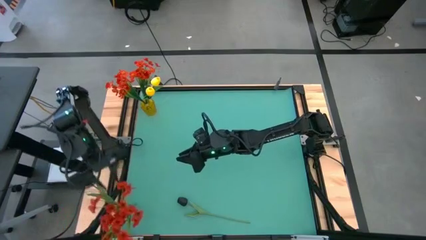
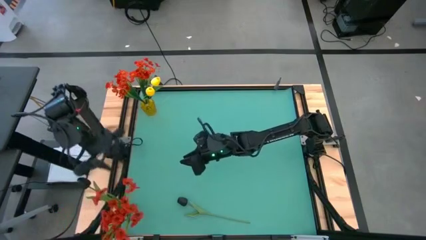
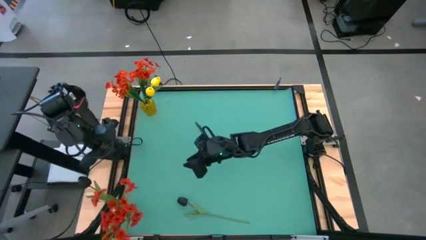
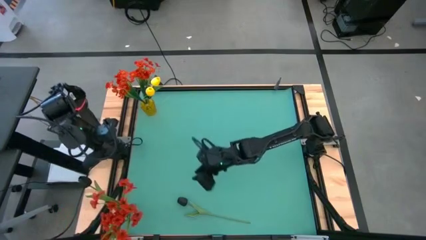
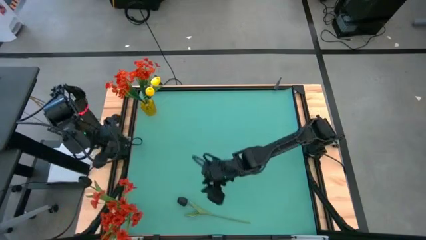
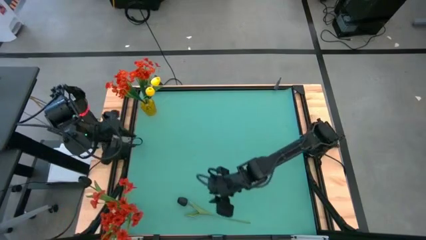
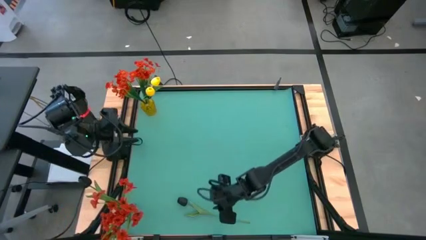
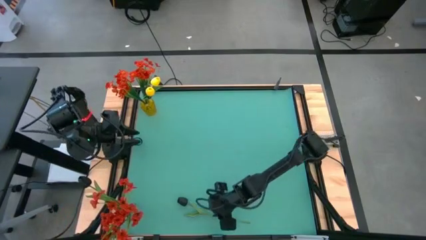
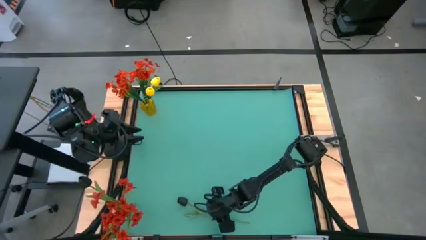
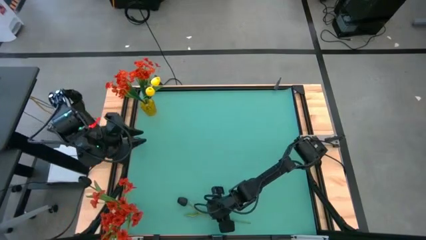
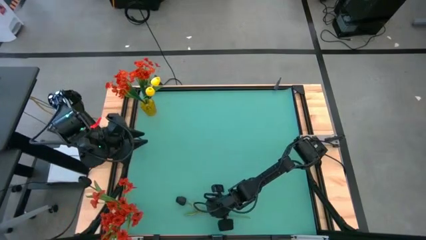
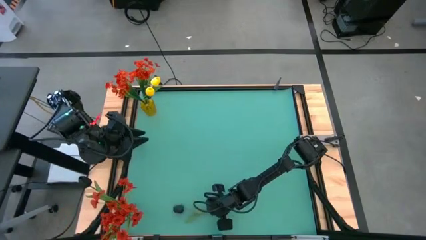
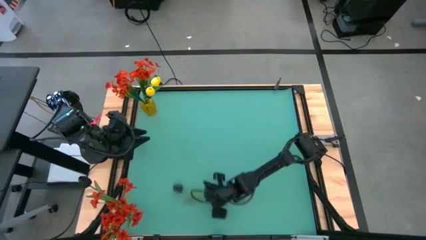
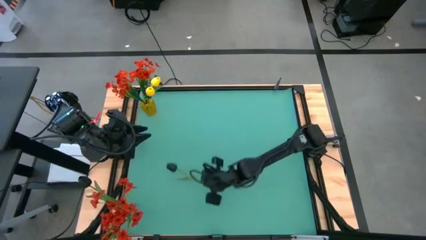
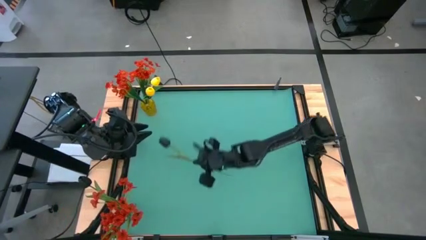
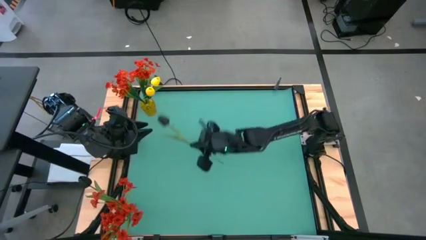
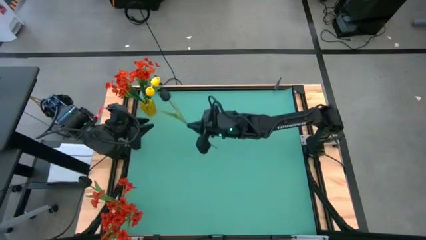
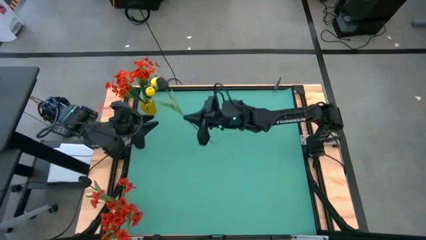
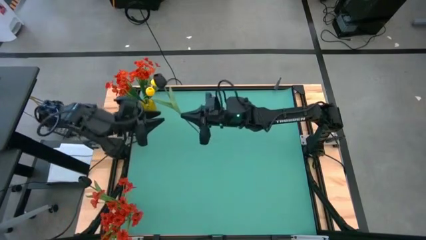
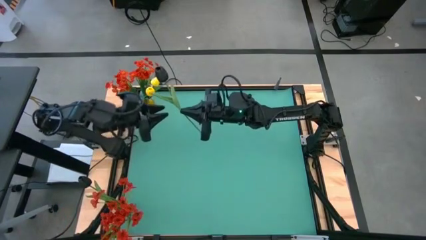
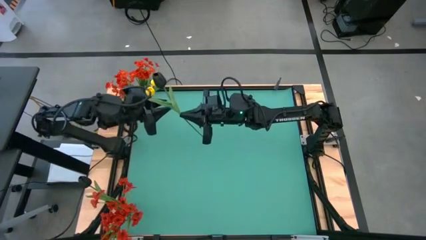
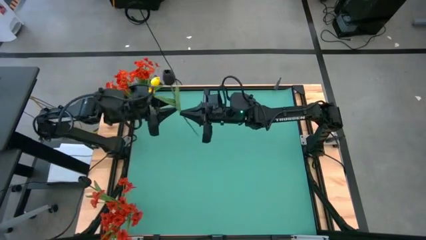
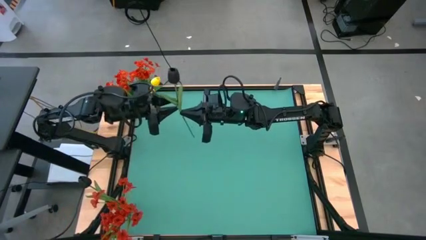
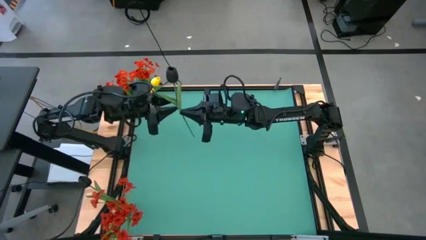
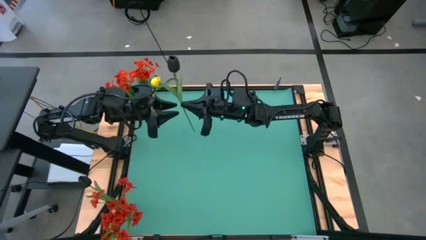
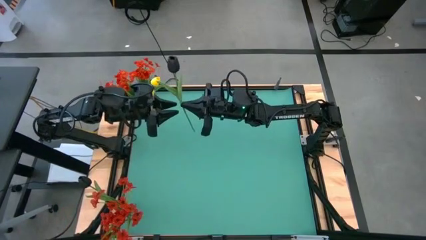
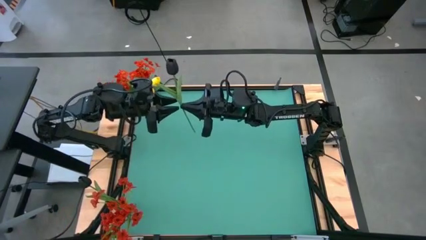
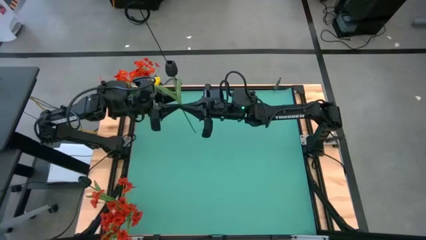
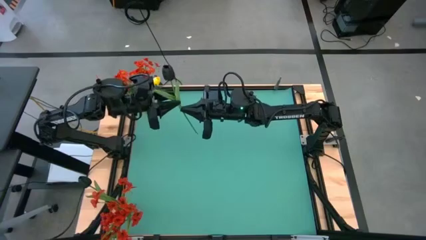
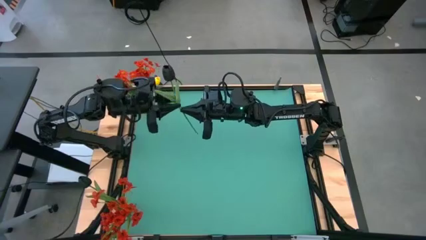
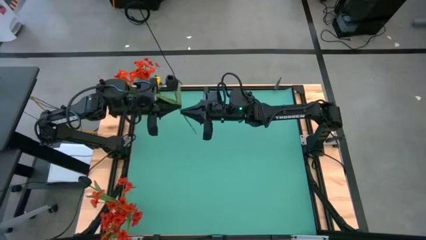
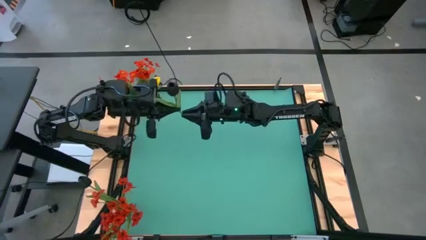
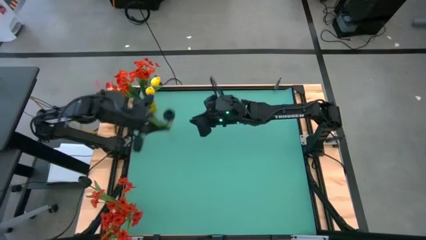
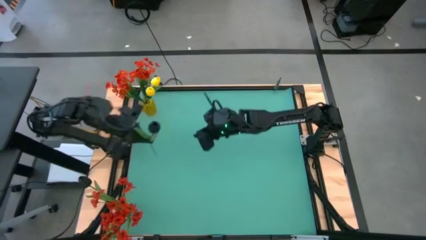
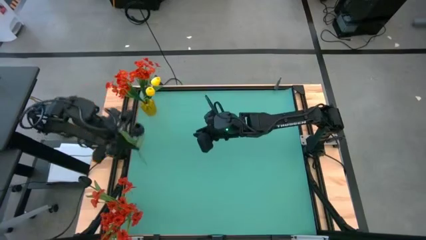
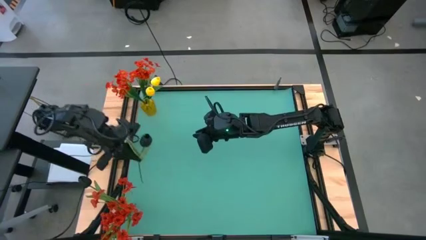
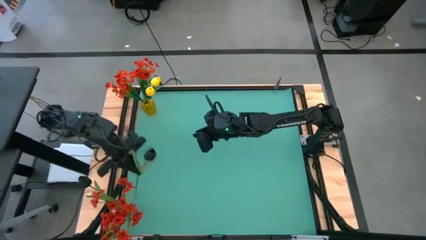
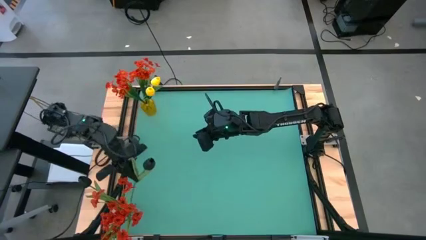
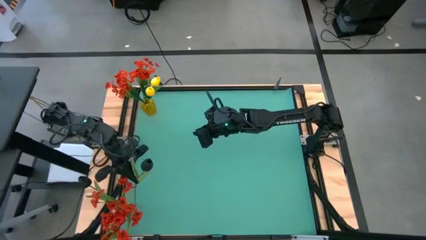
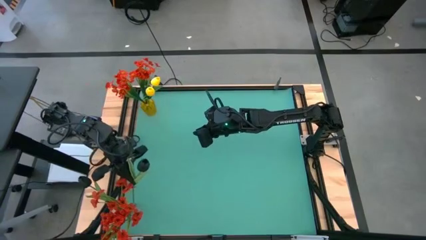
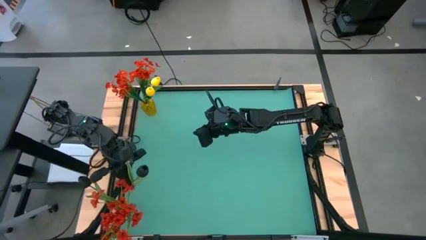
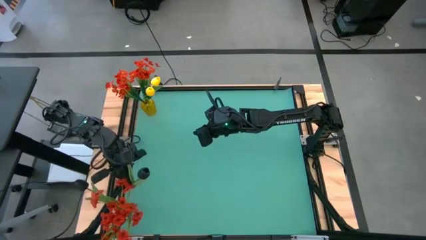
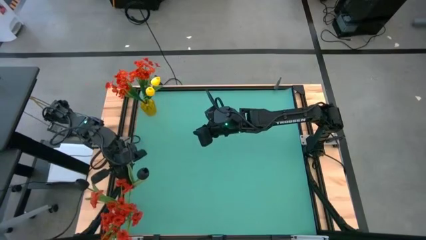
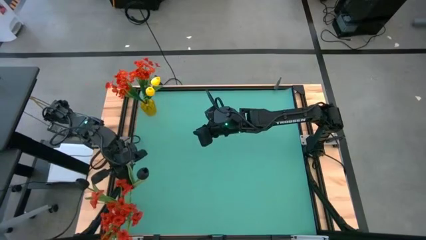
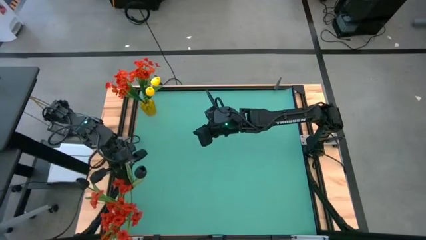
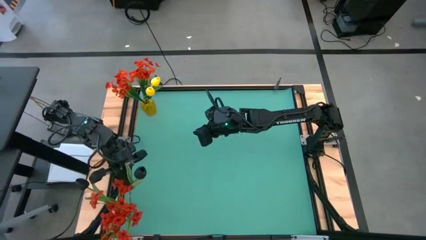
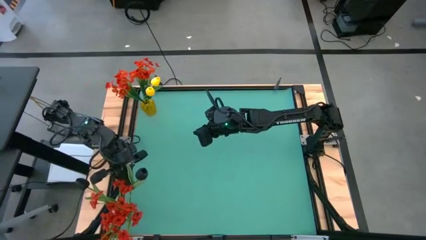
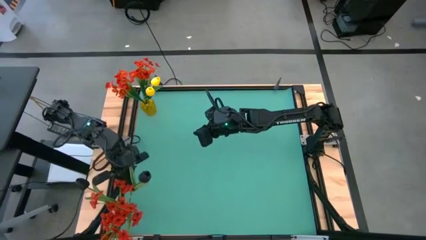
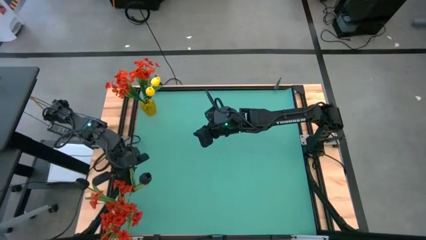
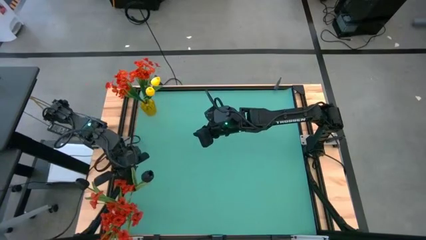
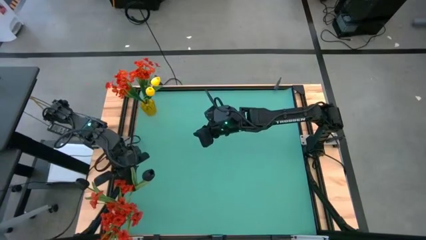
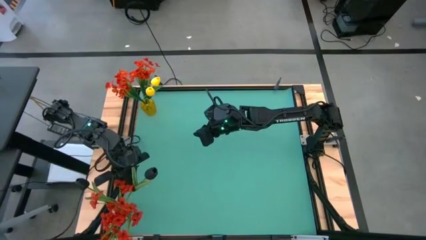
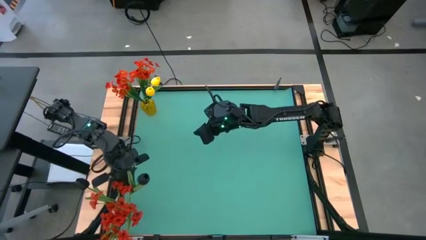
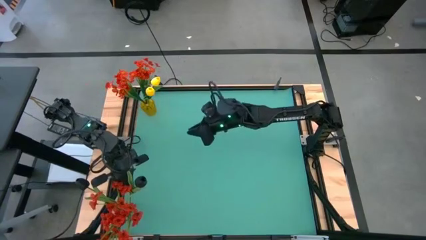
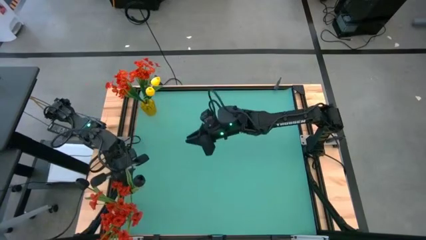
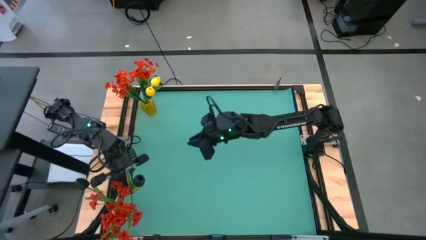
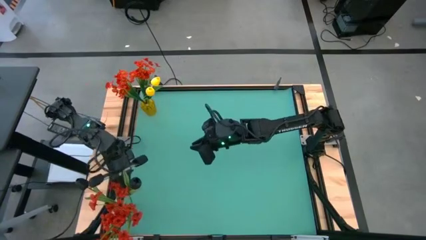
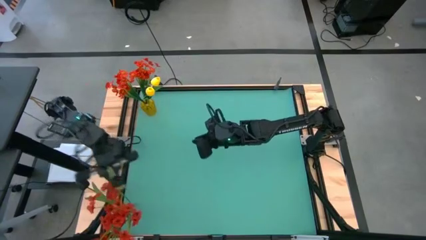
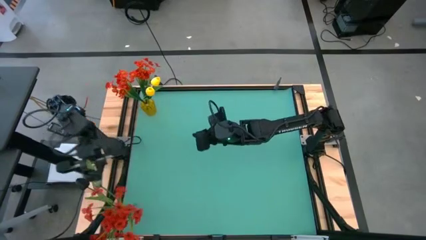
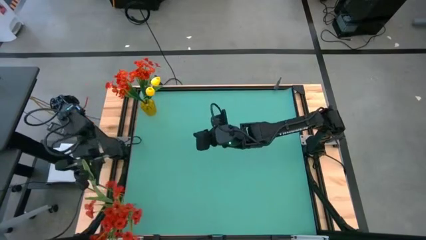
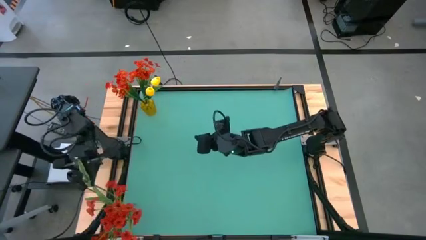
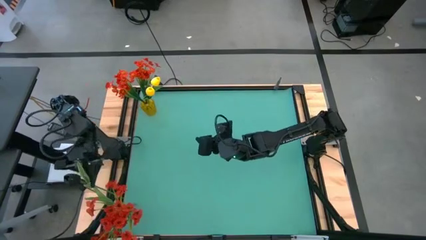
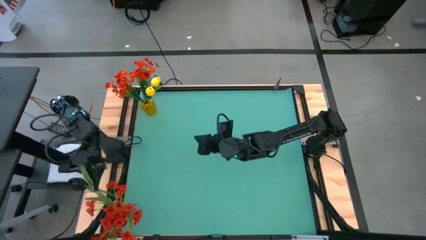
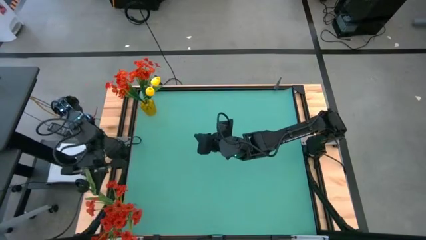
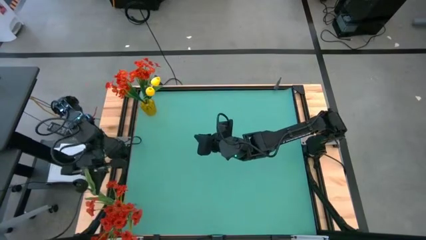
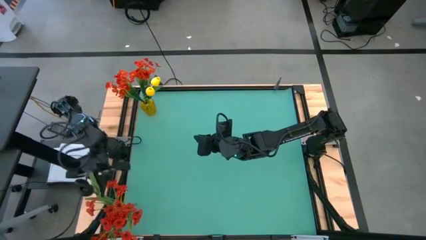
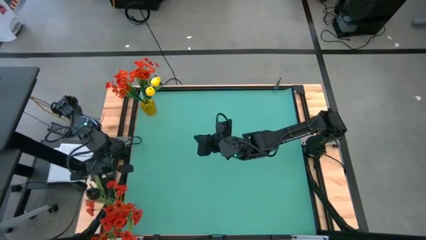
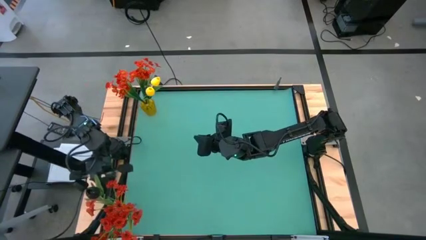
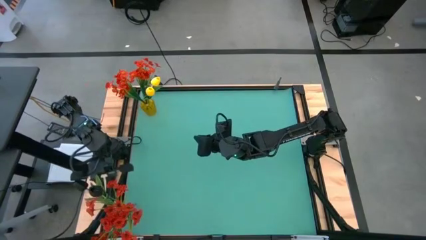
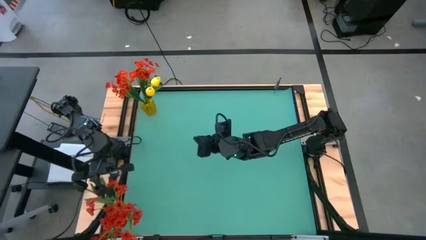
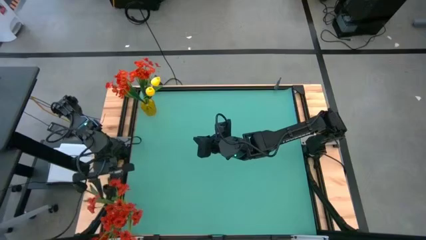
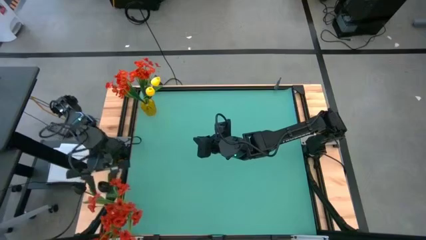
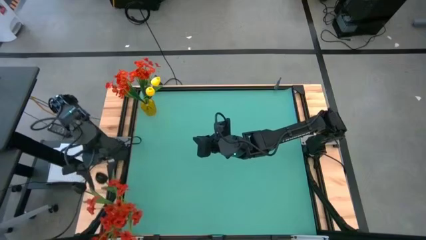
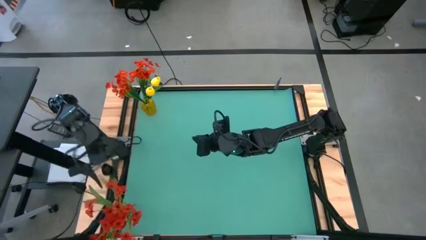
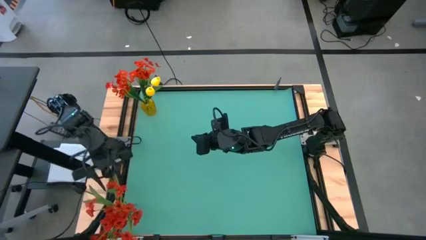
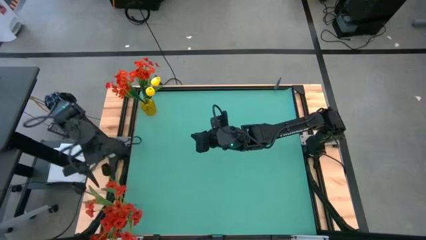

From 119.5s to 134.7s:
Task: Sort flowers into vase by color
Put the black flower into the transparent vase
